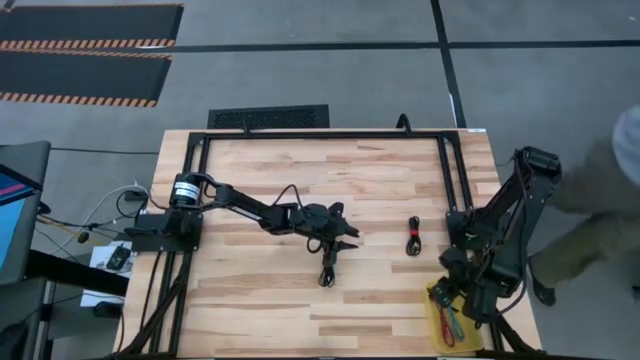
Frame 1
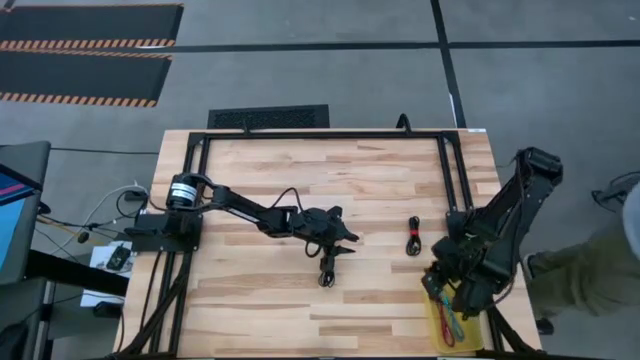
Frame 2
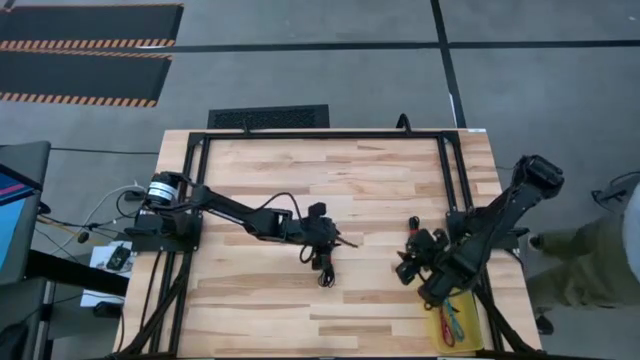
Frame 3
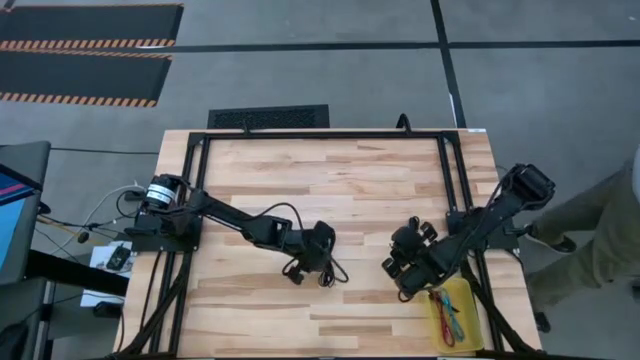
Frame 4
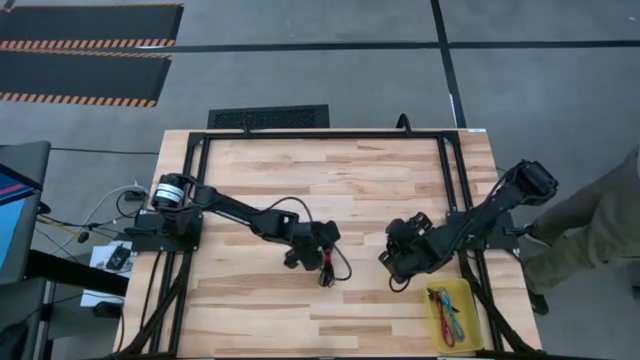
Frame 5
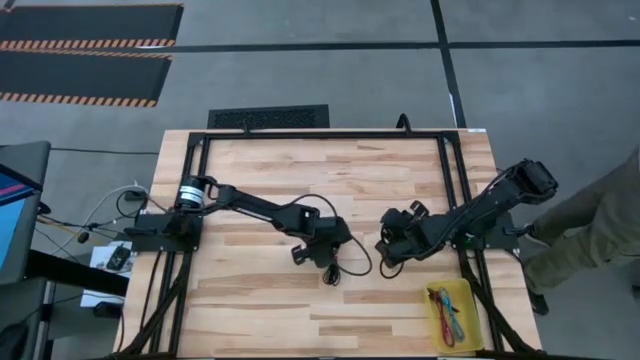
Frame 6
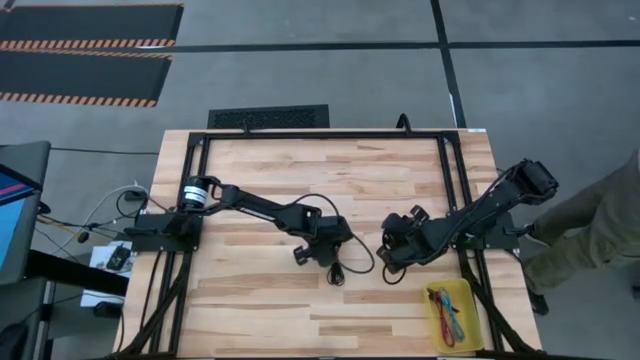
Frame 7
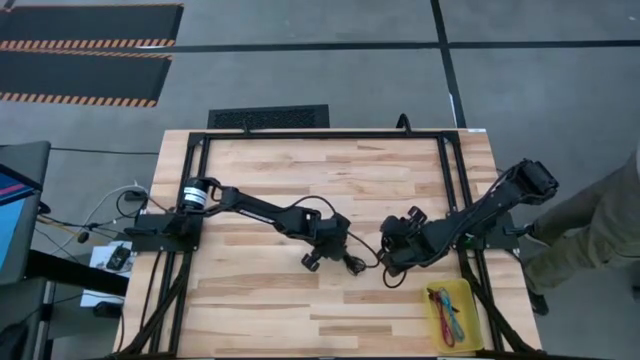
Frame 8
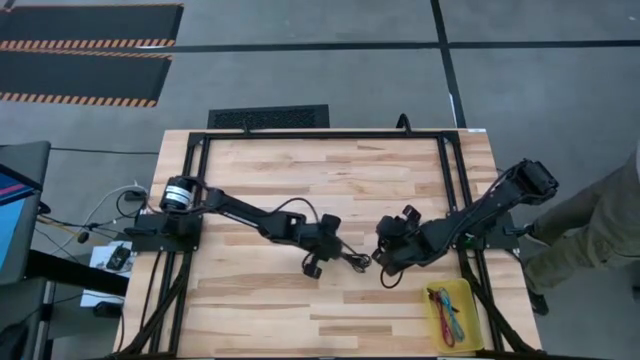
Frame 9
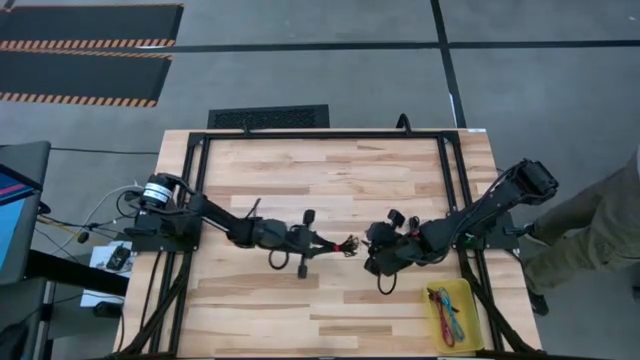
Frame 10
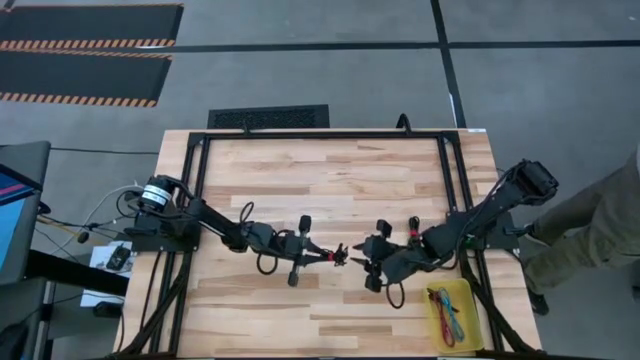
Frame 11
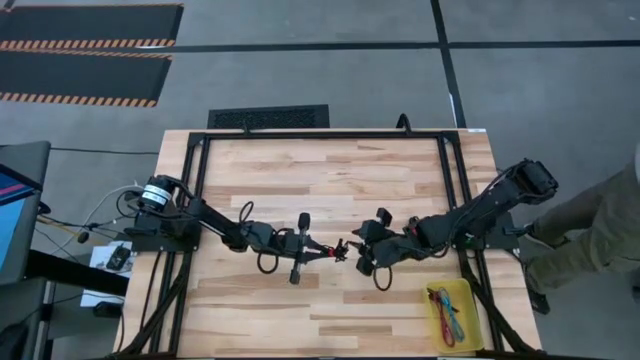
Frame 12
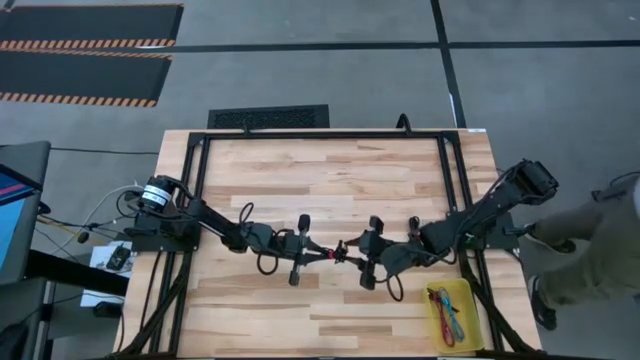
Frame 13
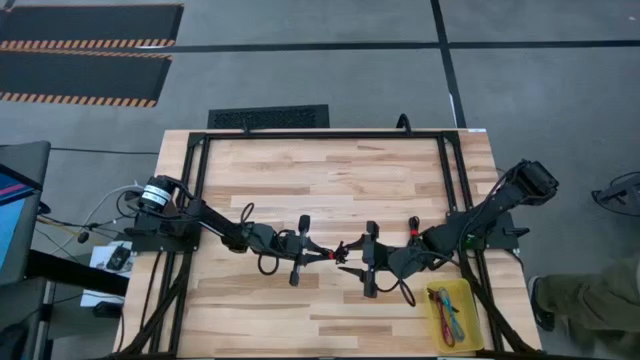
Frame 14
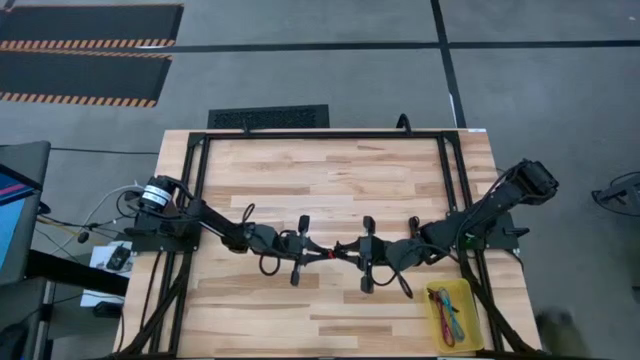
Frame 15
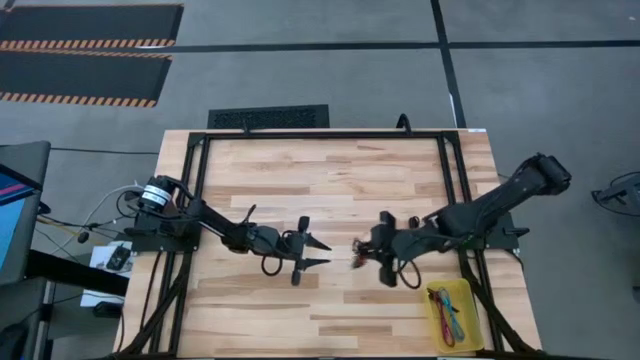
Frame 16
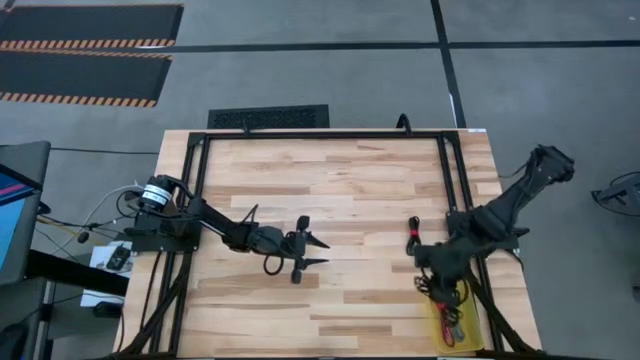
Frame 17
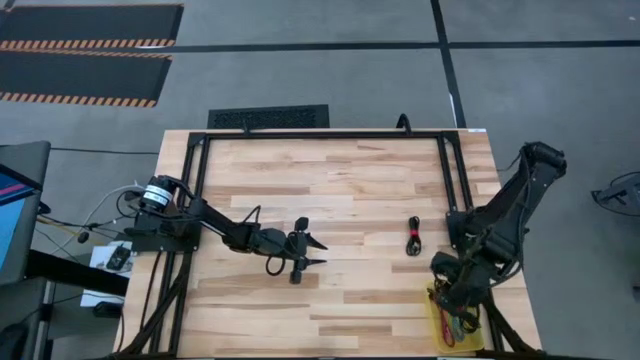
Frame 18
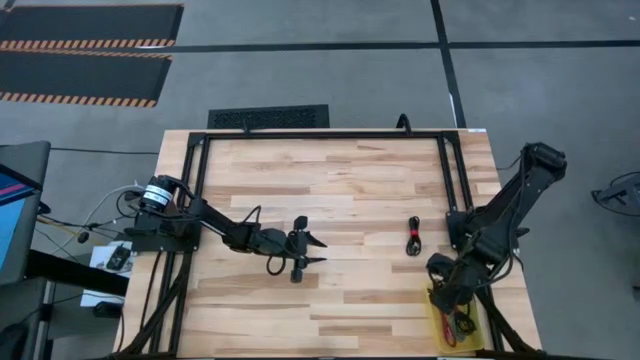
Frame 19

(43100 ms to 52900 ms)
Task: Pick and place USB-C Cables
Put the left black charger cable into the yellow bin

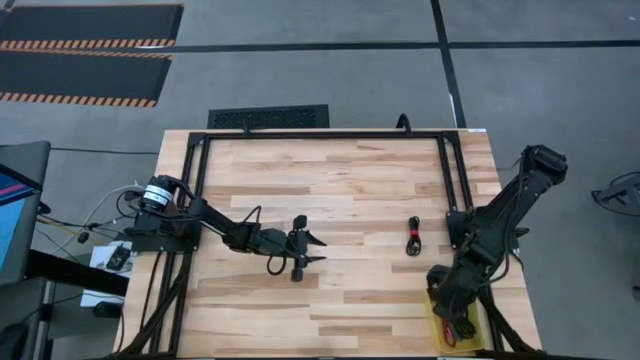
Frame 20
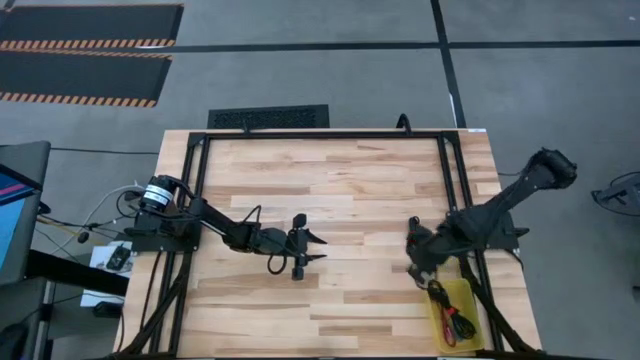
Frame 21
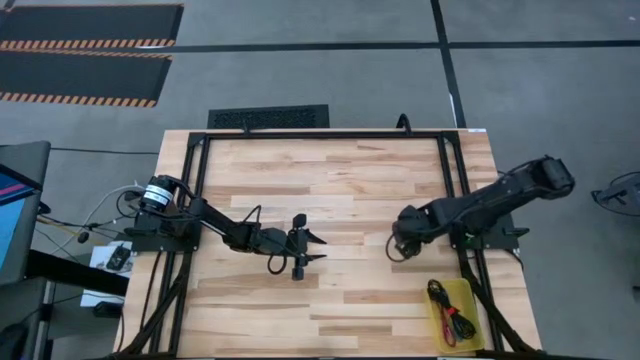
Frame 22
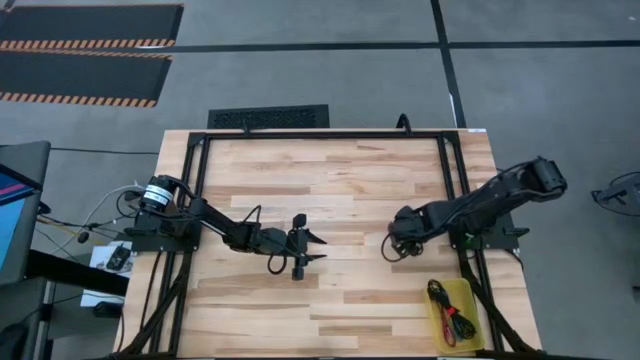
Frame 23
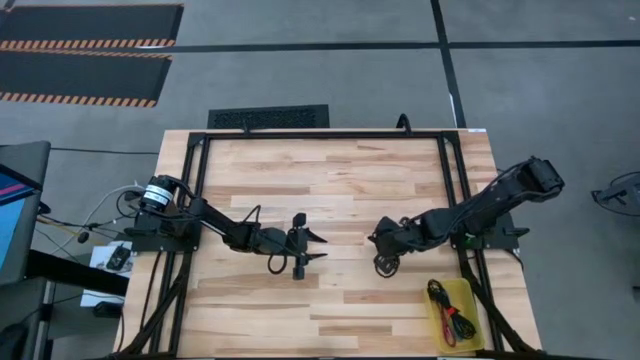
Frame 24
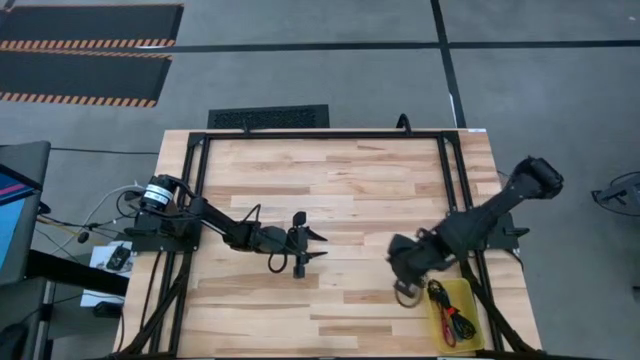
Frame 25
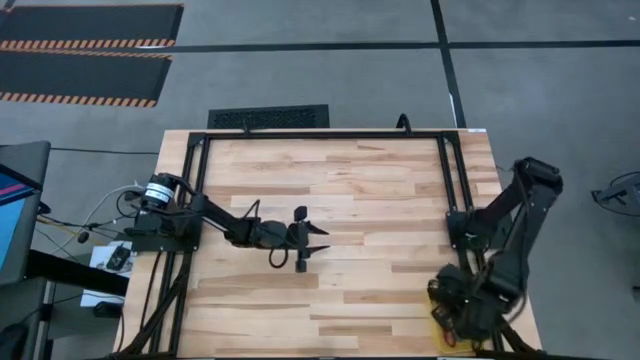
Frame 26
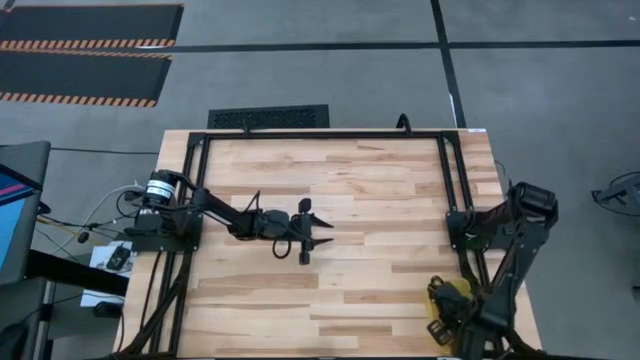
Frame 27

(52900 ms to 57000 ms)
Put the black charger cable into the yellow bin

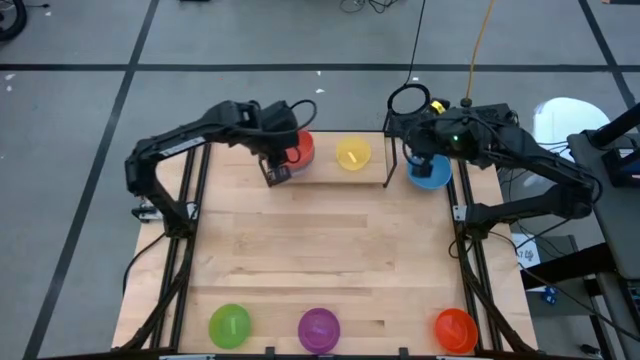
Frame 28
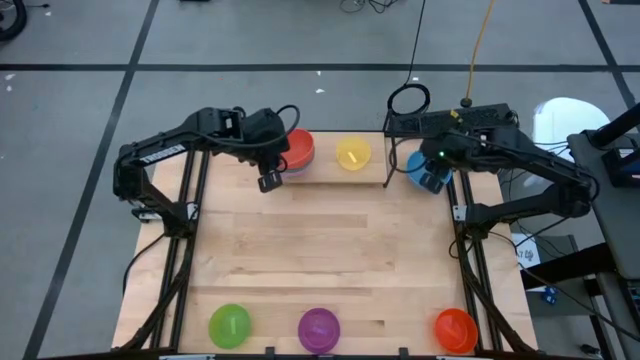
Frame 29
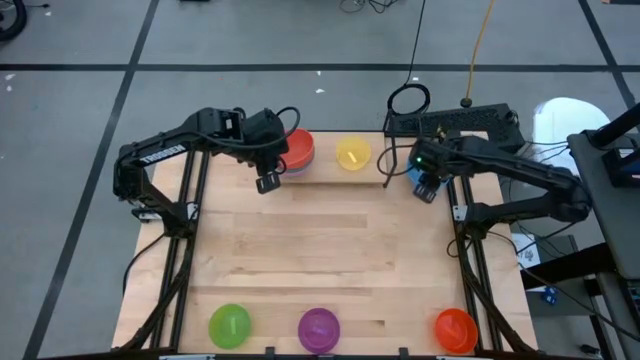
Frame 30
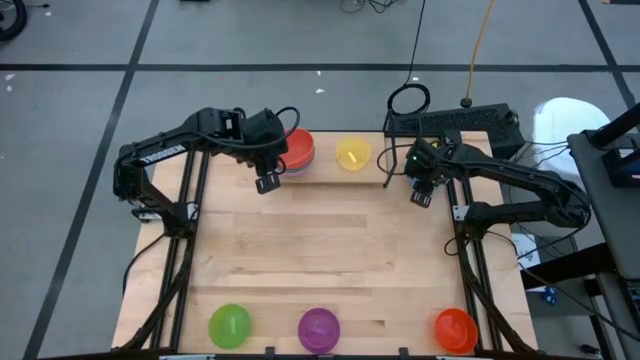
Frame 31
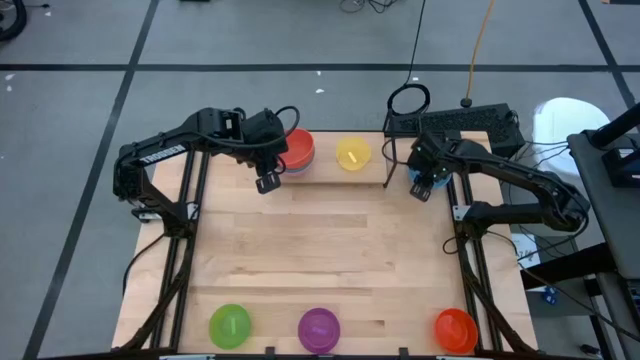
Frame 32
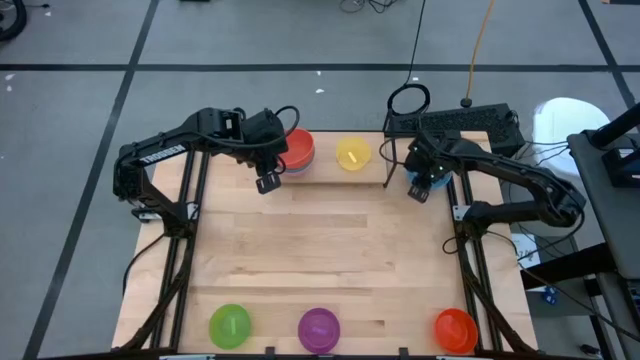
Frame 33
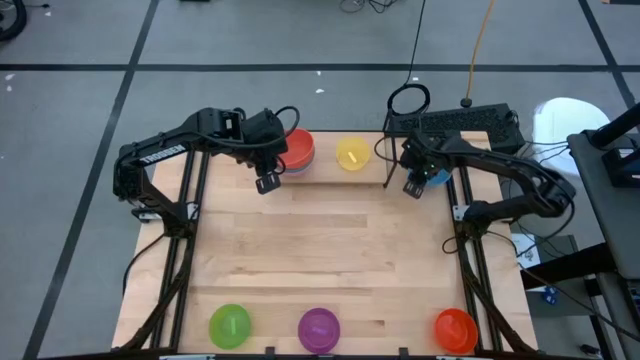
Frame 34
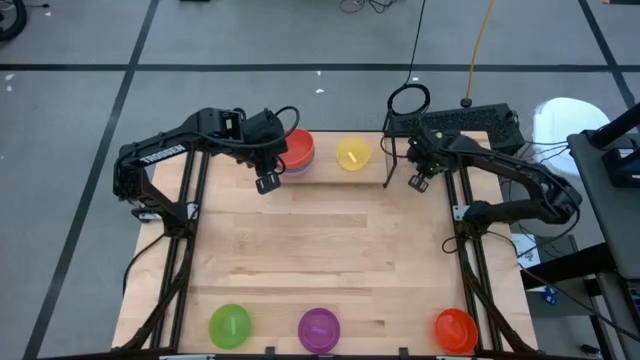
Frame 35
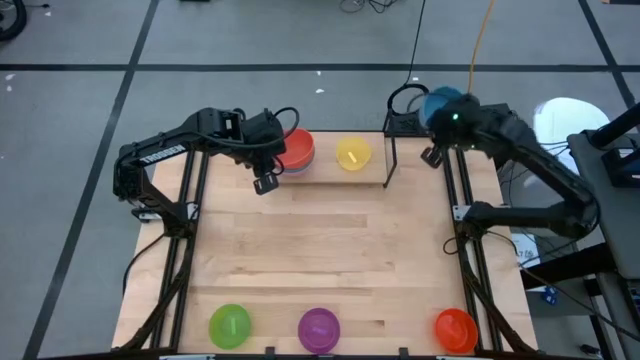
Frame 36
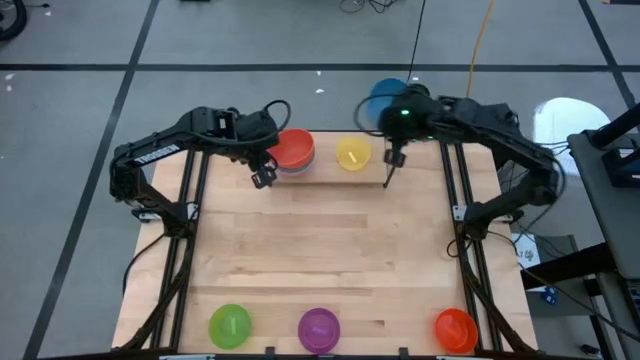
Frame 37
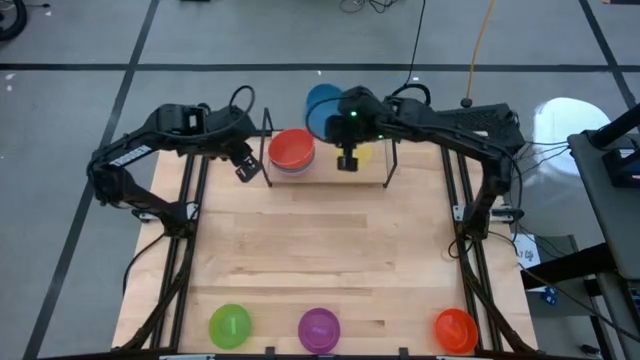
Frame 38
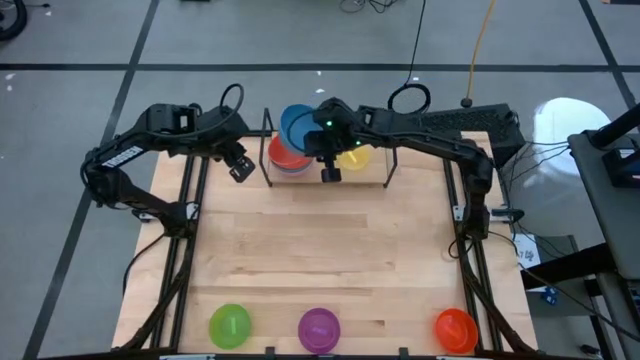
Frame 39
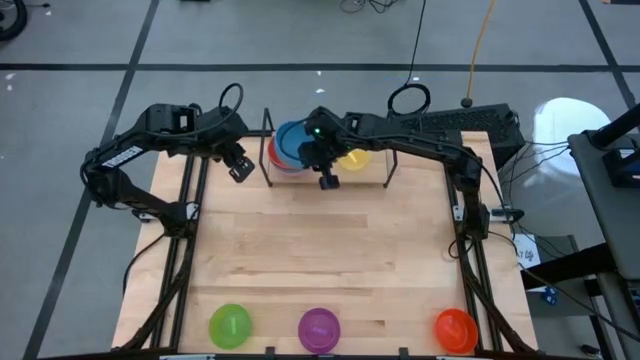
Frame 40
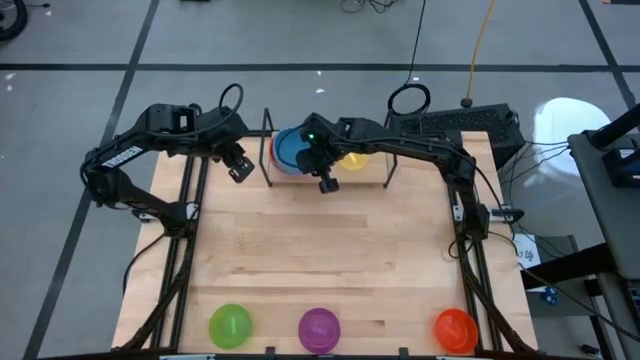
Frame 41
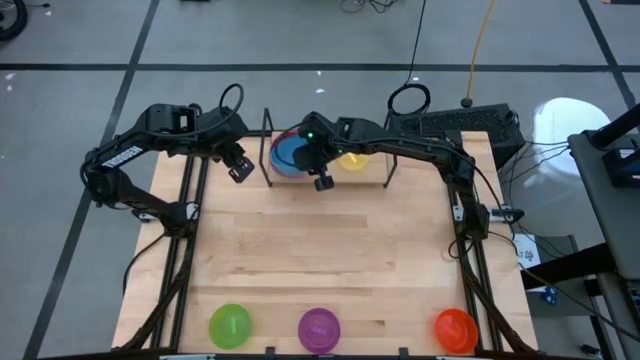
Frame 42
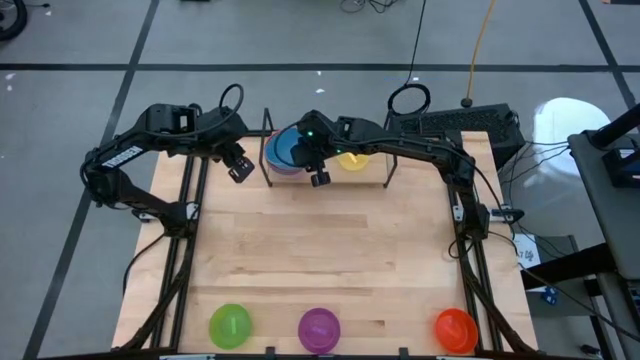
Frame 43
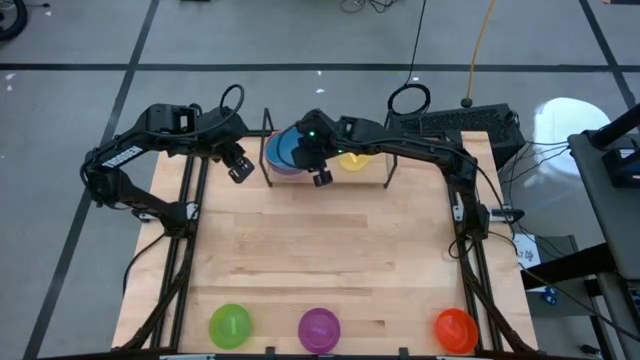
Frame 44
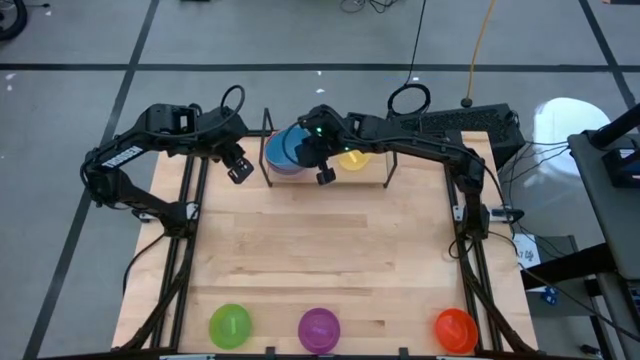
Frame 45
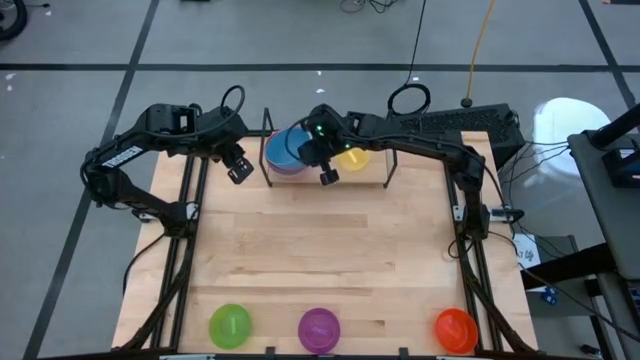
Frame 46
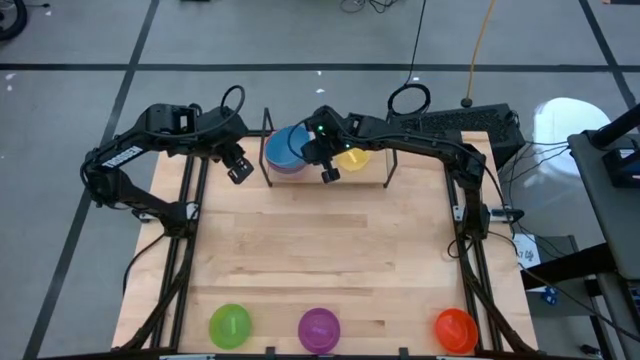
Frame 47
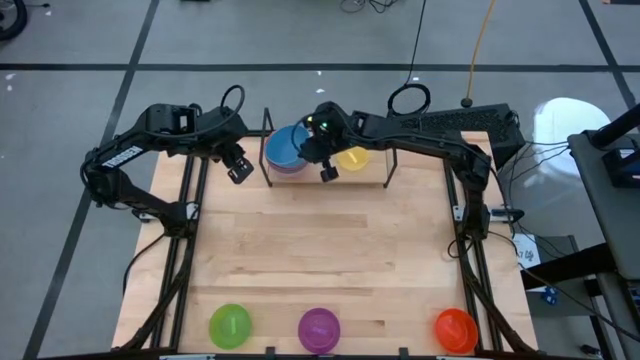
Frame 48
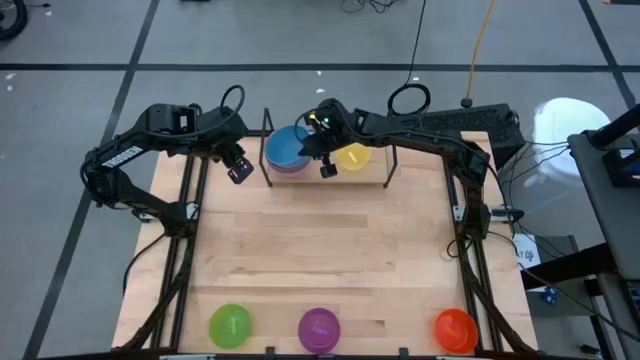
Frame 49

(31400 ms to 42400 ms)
Task: Place and stack bowls onto a shelf
Stack the blue bowl on top of the orange bowl on the shelf
